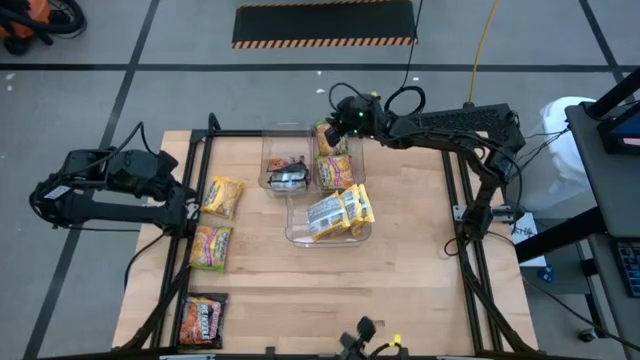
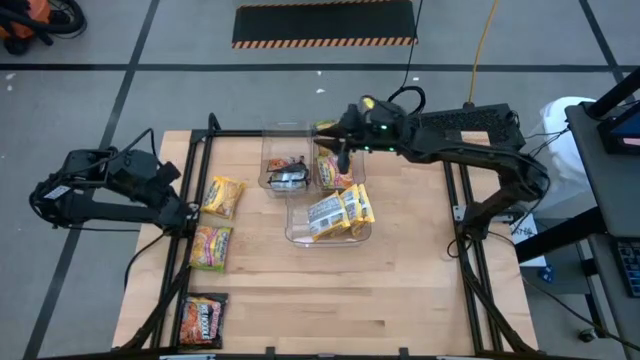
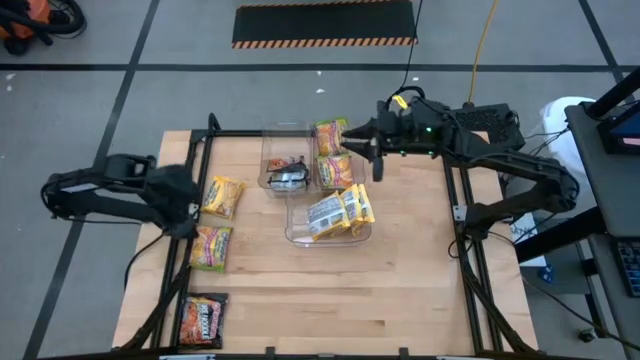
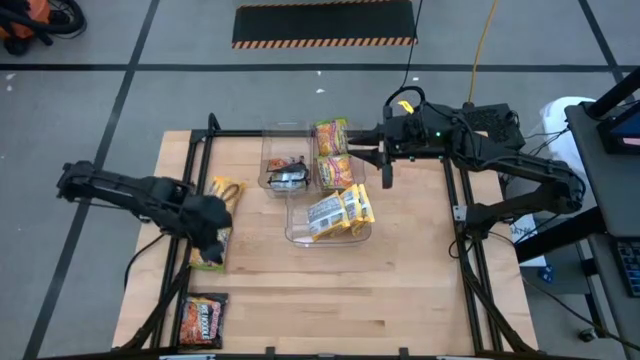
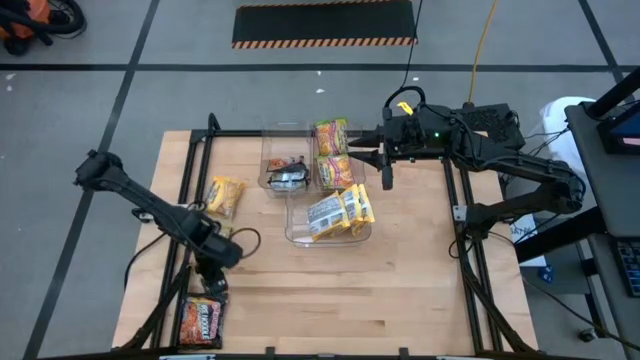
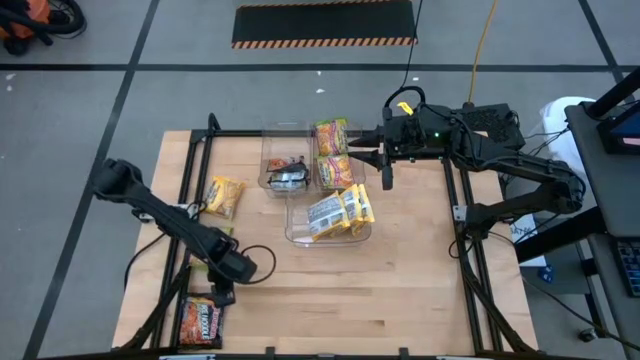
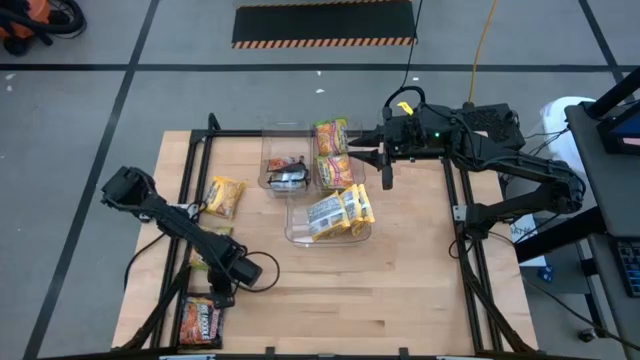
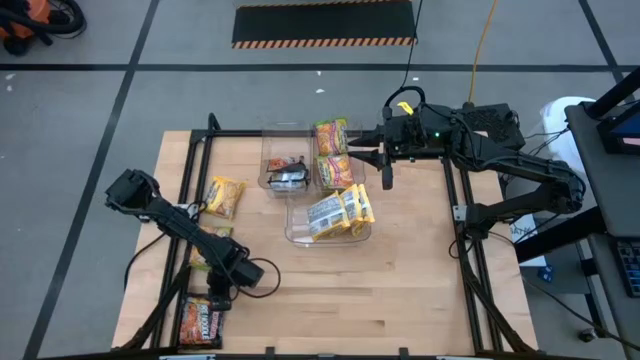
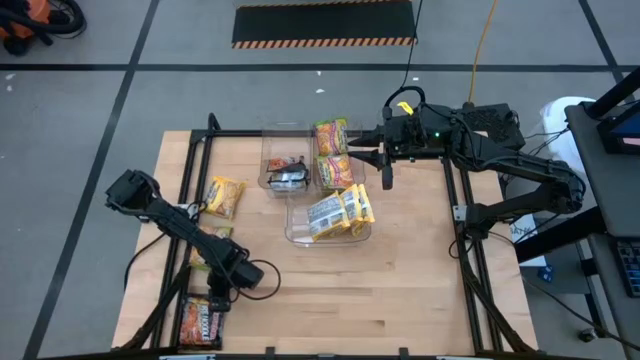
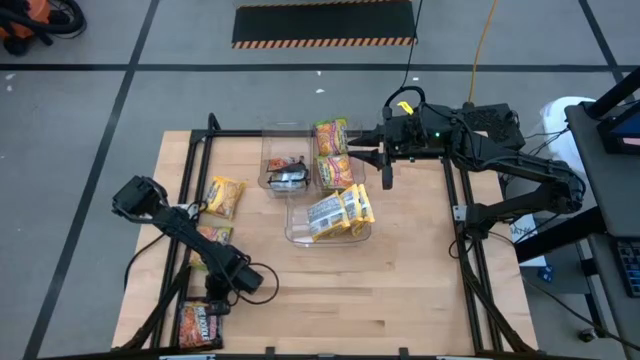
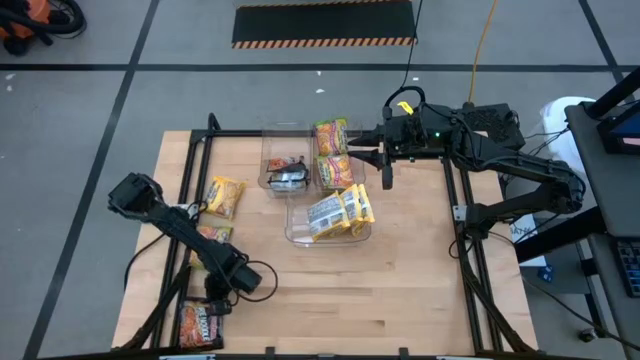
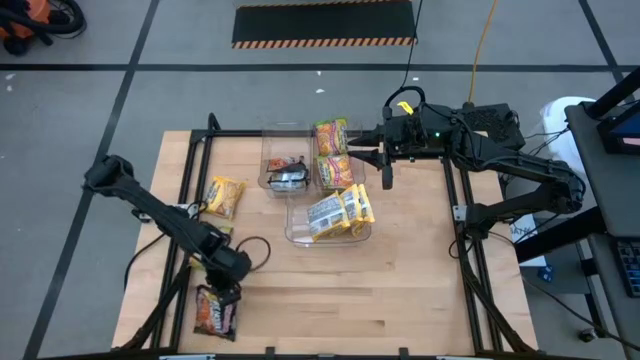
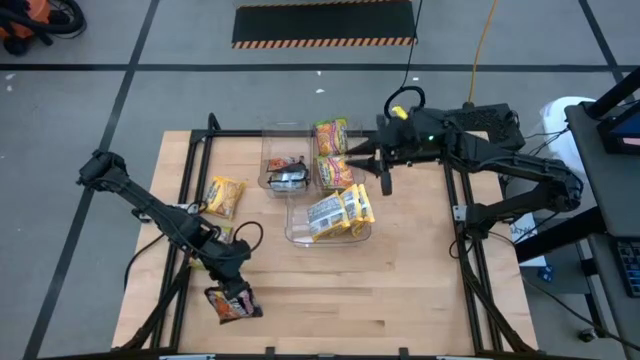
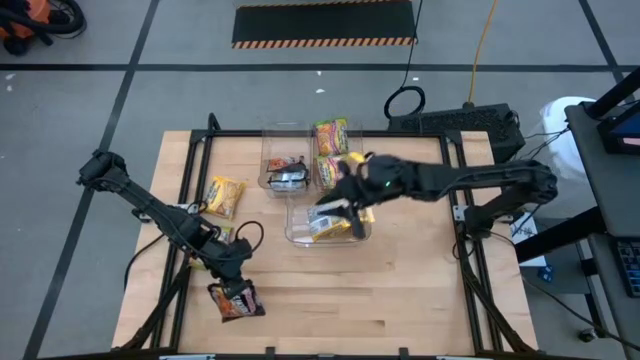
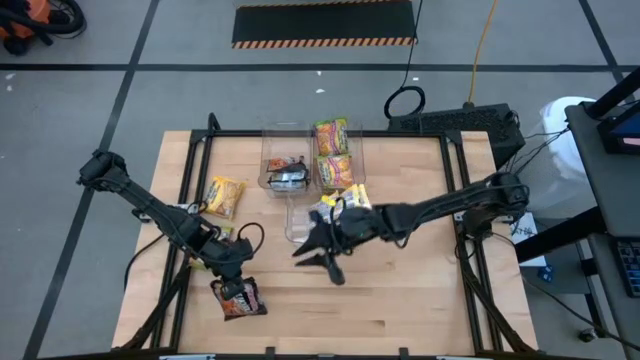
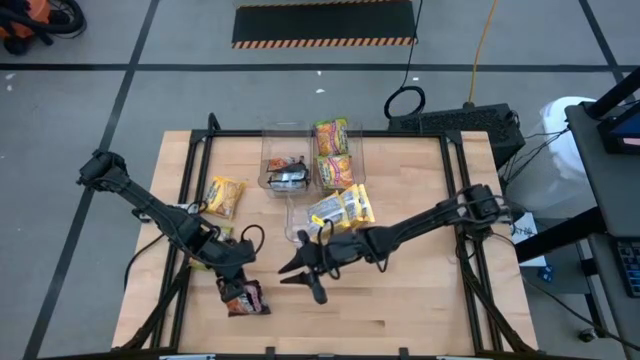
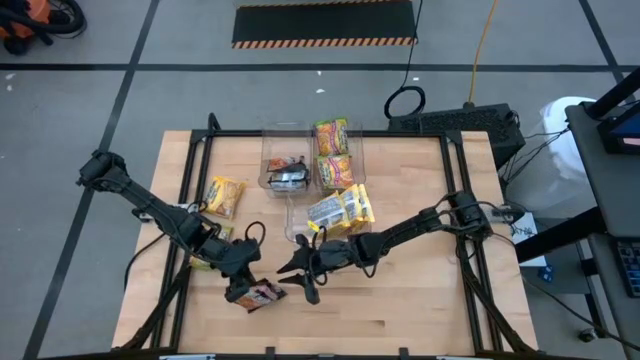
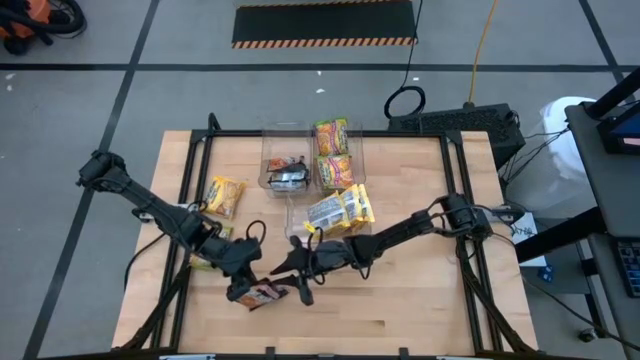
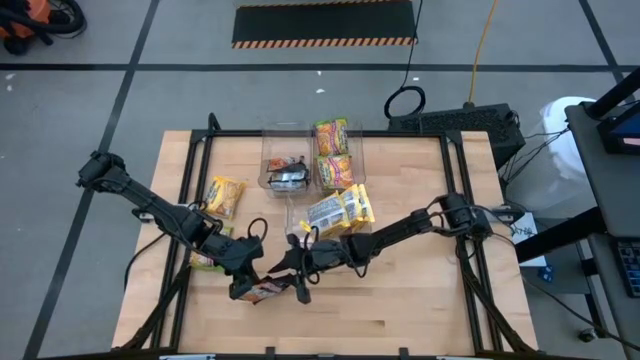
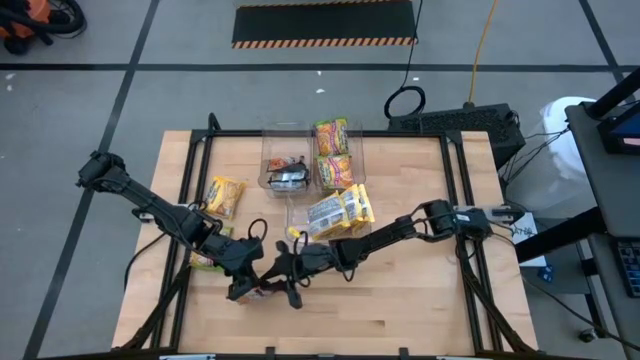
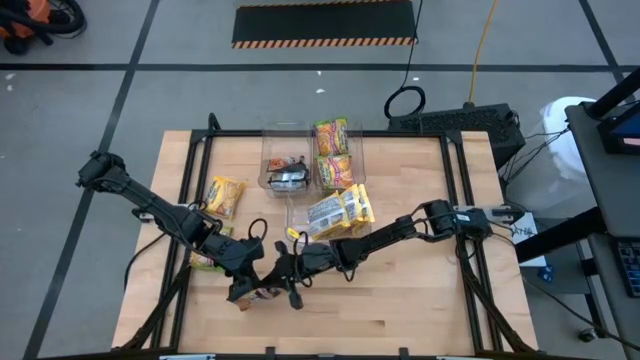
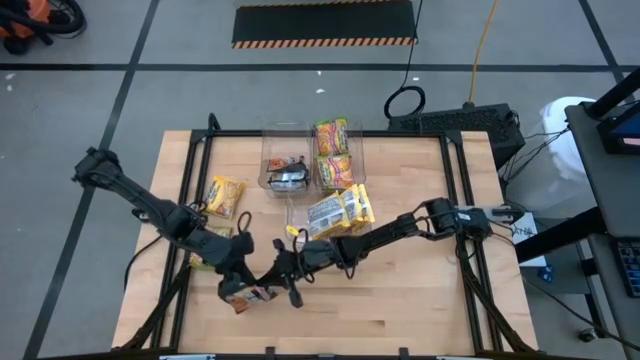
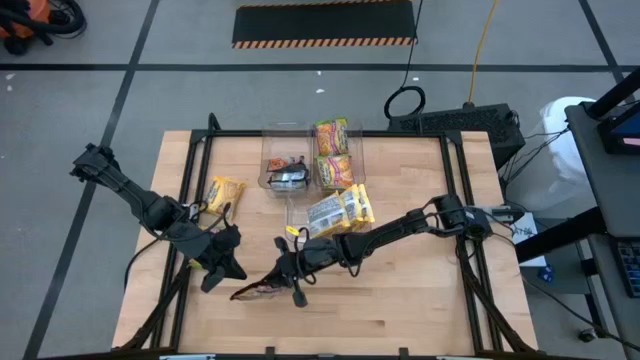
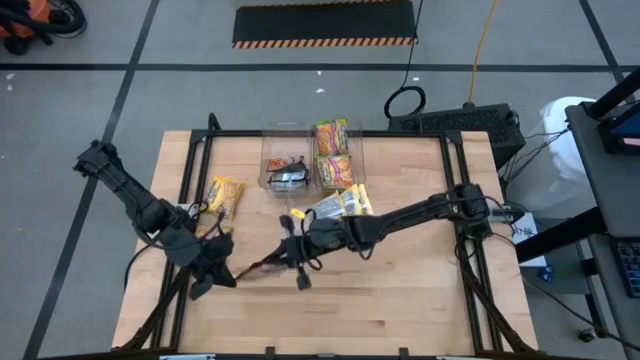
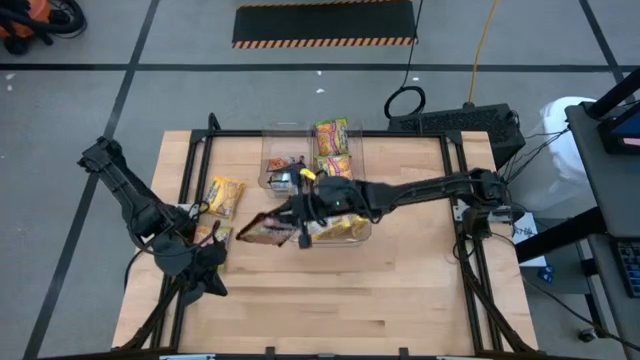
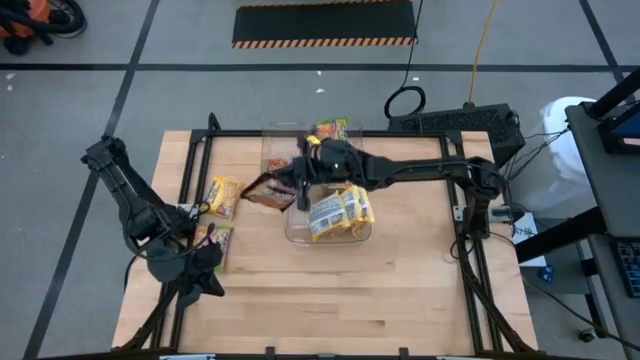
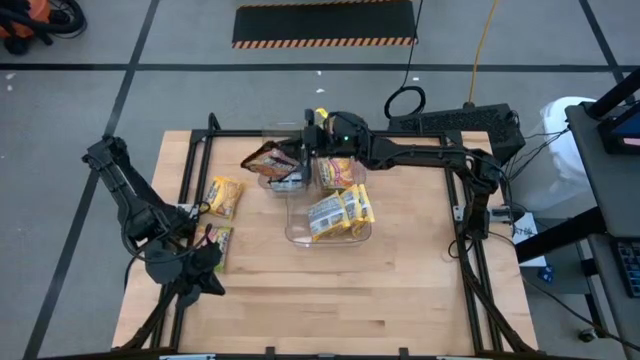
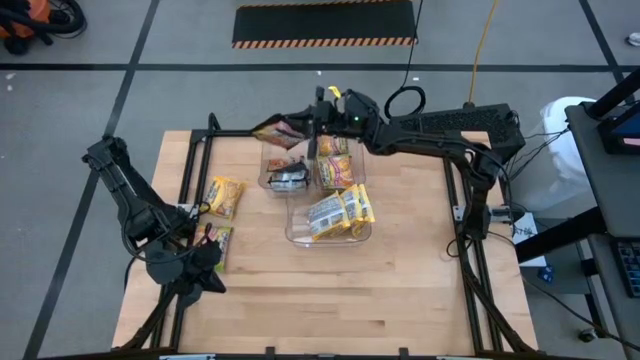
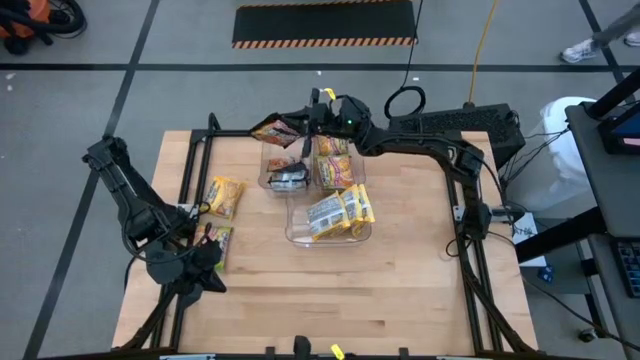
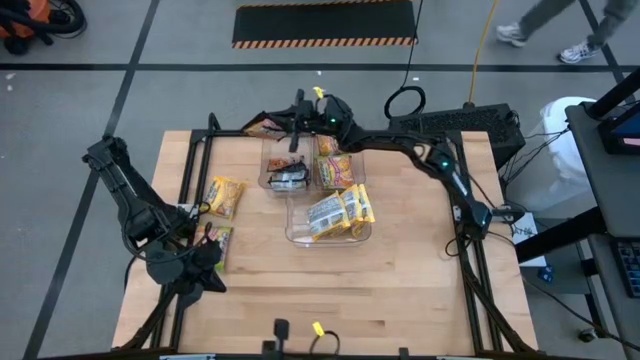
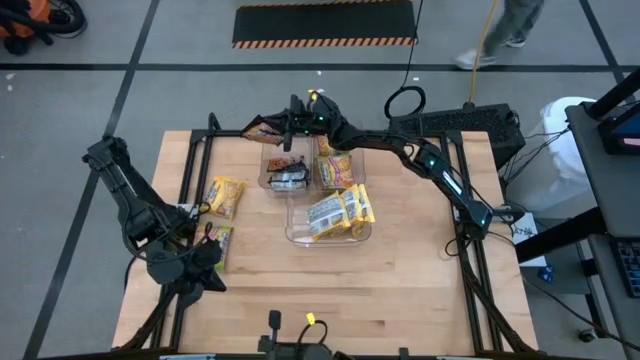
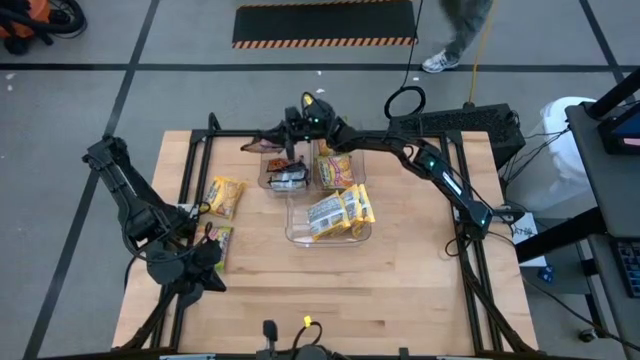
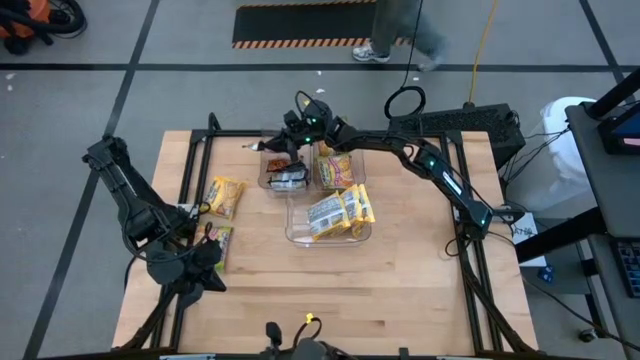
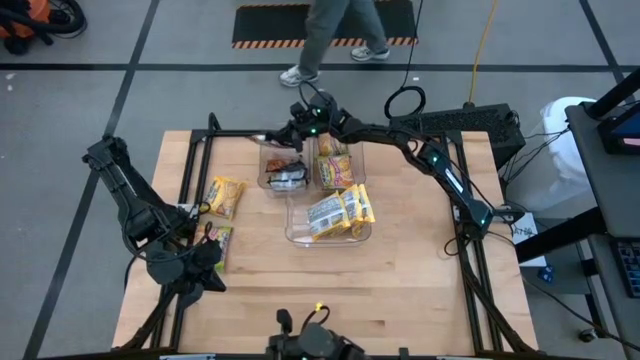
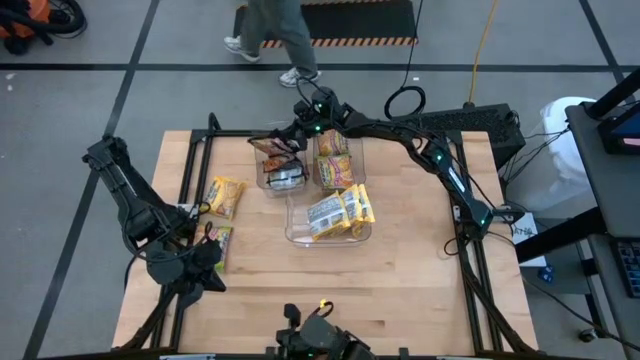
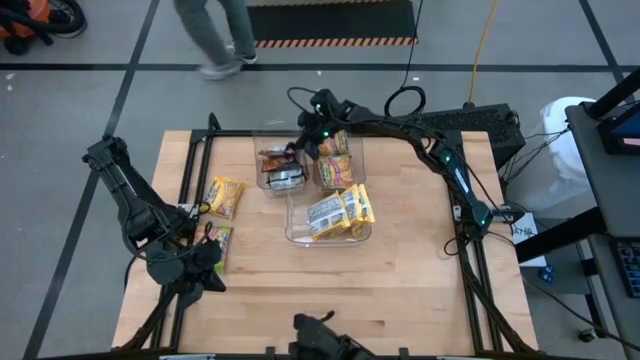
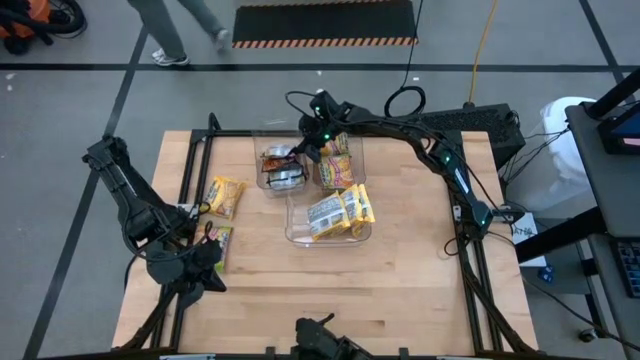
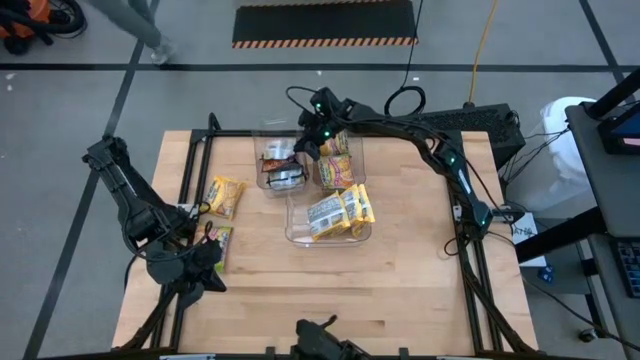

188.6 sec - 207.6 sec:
Task: Sort Maruchan noodles
Put the black noodle pack into the top left transparent bin
